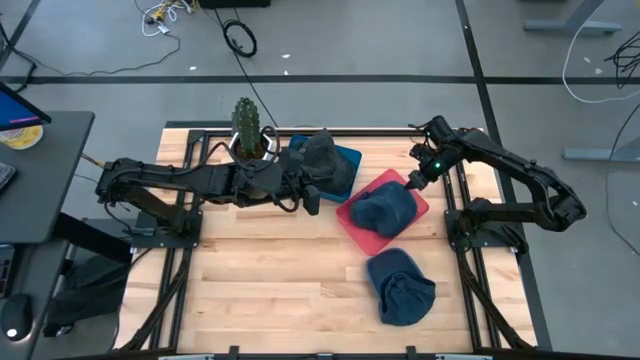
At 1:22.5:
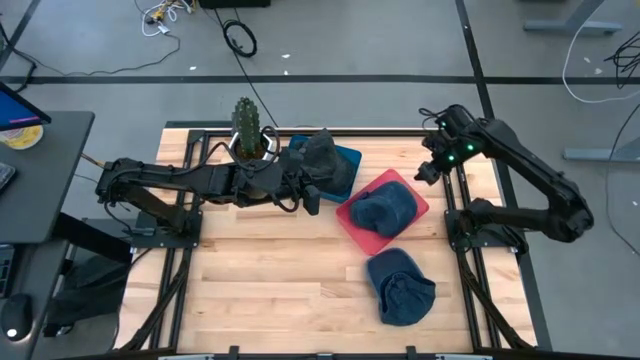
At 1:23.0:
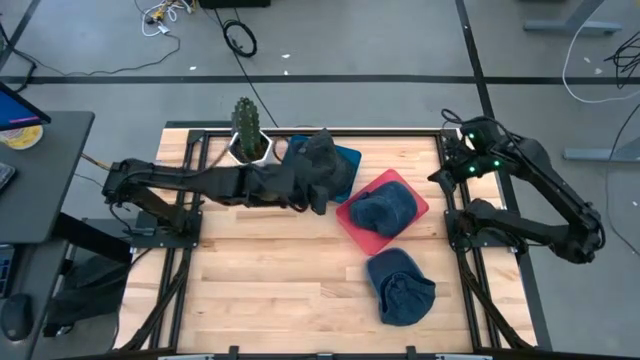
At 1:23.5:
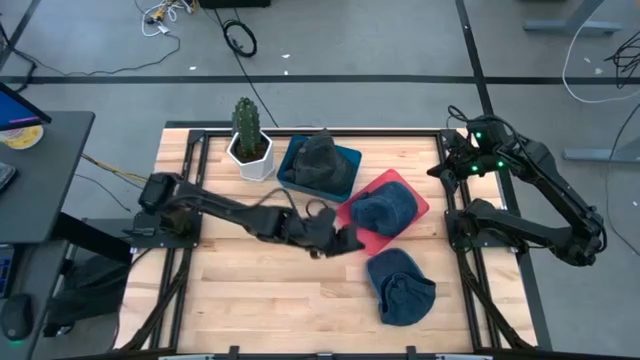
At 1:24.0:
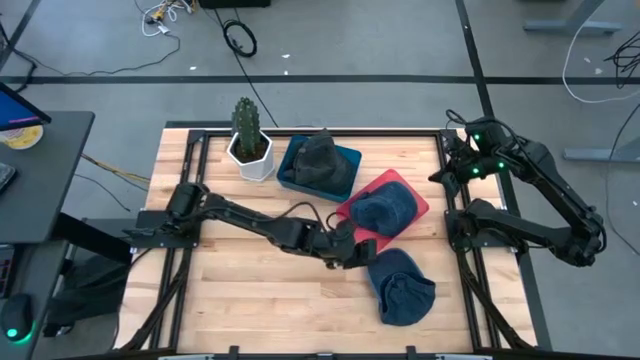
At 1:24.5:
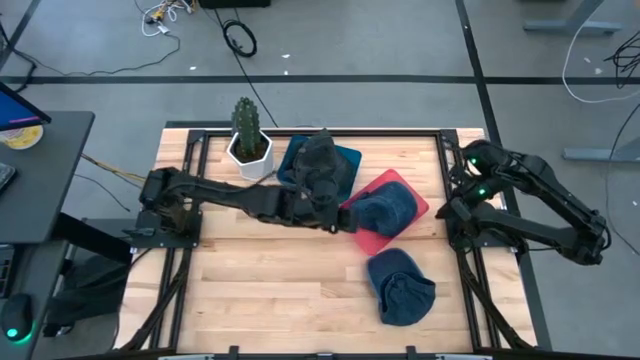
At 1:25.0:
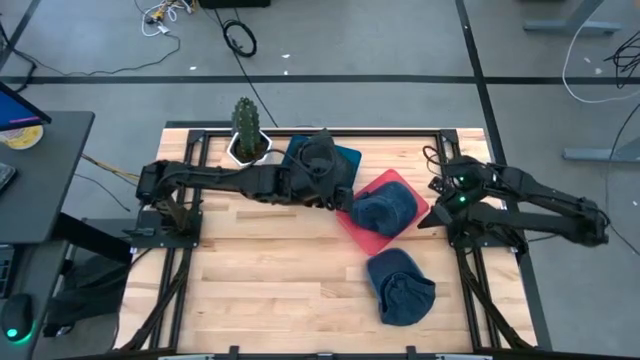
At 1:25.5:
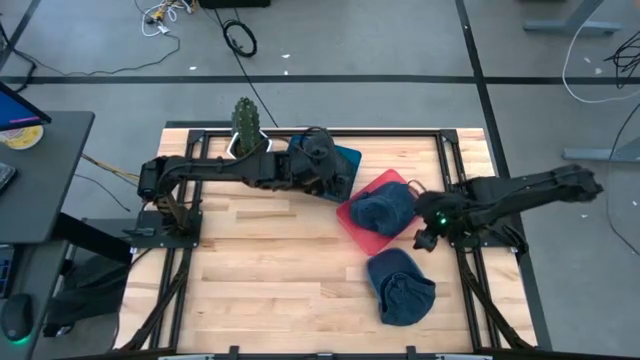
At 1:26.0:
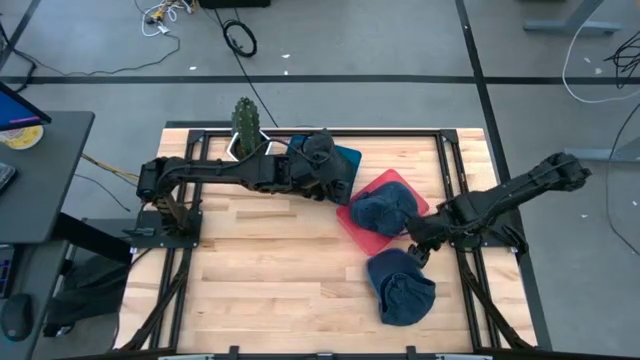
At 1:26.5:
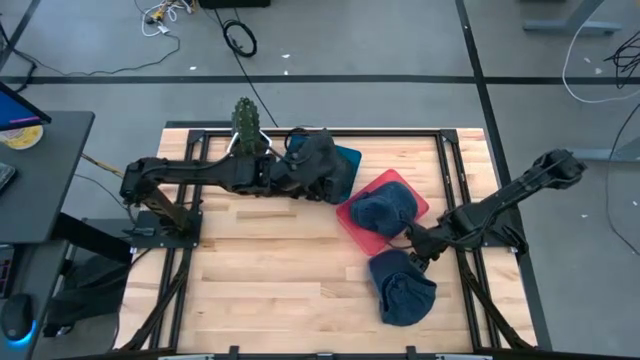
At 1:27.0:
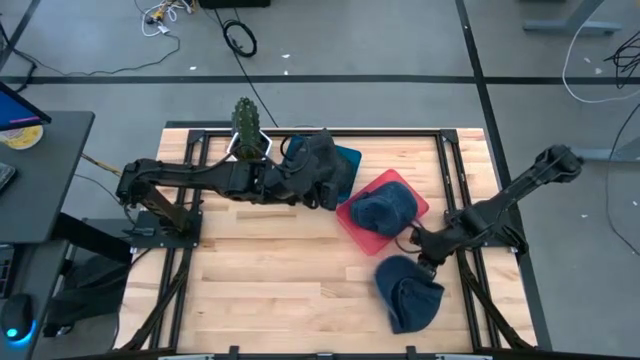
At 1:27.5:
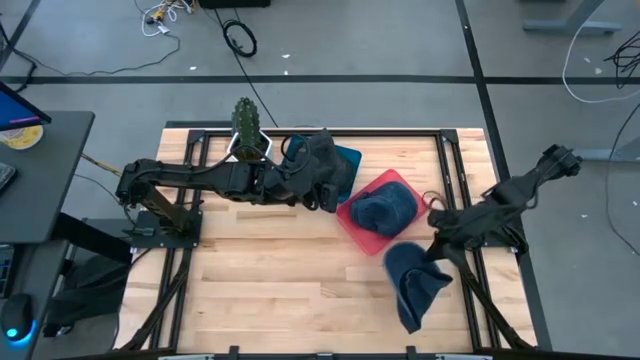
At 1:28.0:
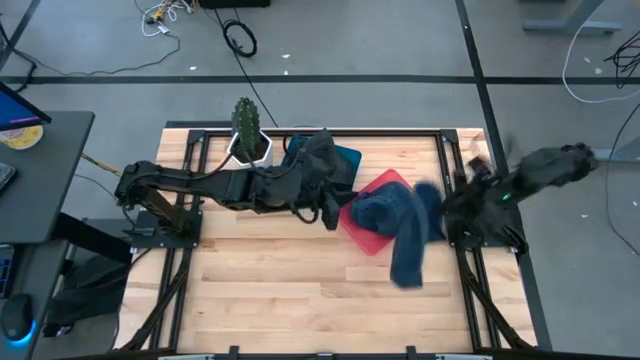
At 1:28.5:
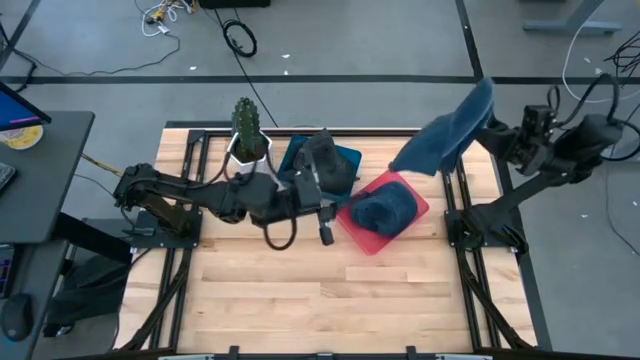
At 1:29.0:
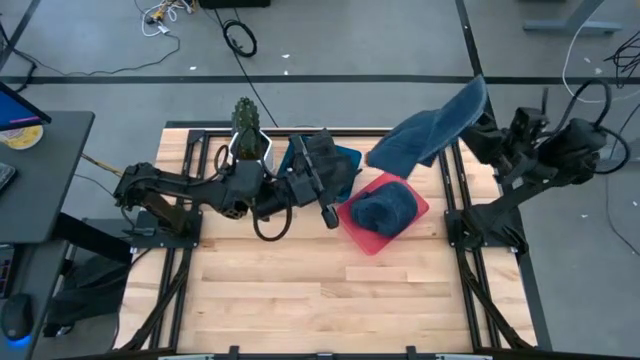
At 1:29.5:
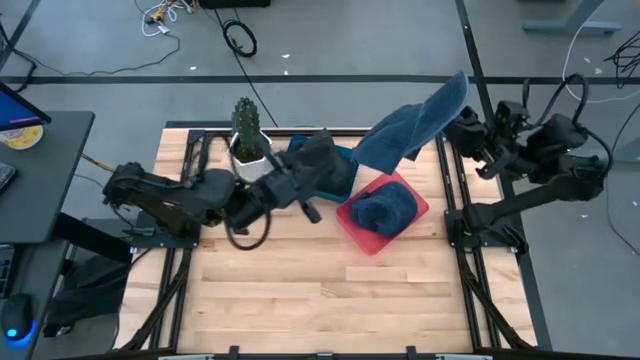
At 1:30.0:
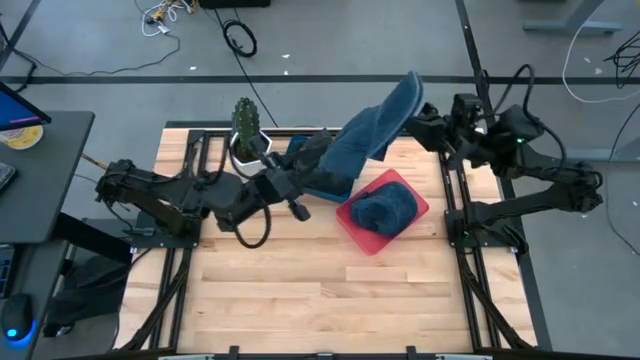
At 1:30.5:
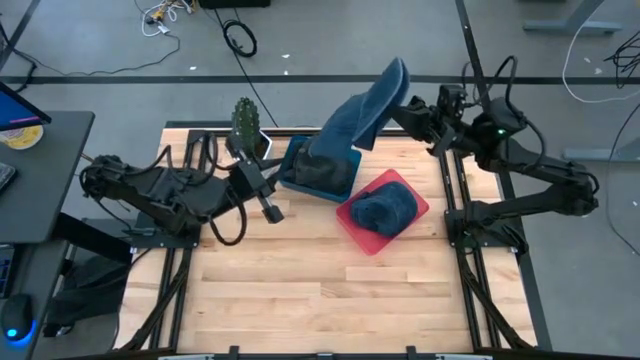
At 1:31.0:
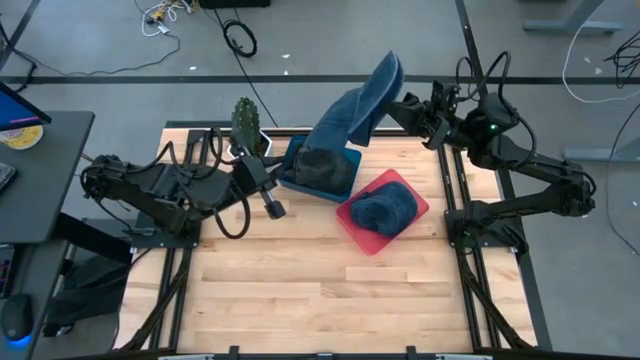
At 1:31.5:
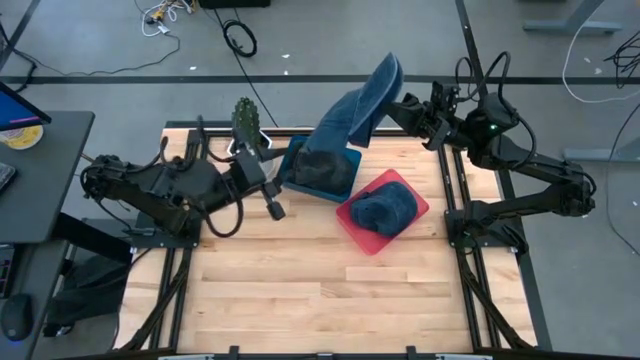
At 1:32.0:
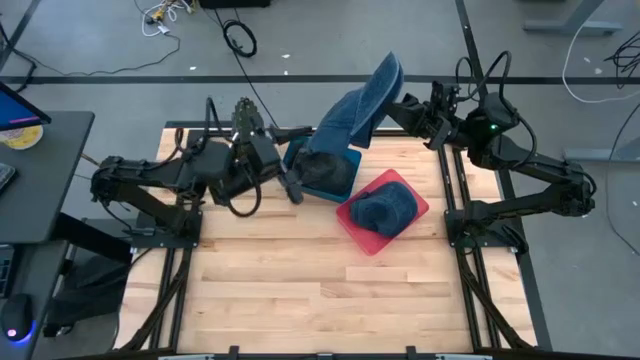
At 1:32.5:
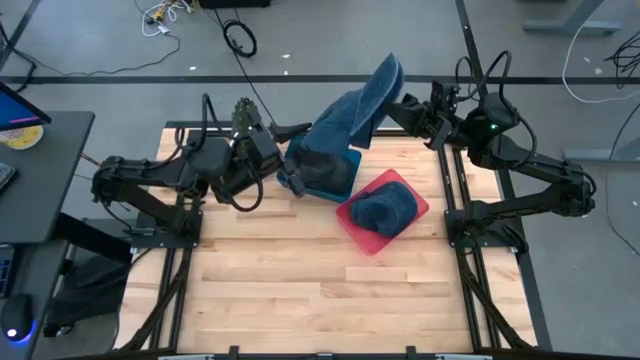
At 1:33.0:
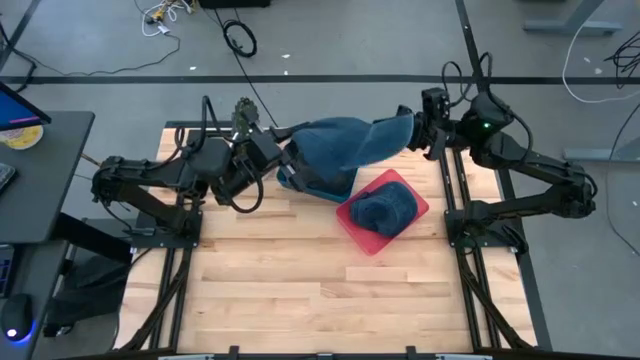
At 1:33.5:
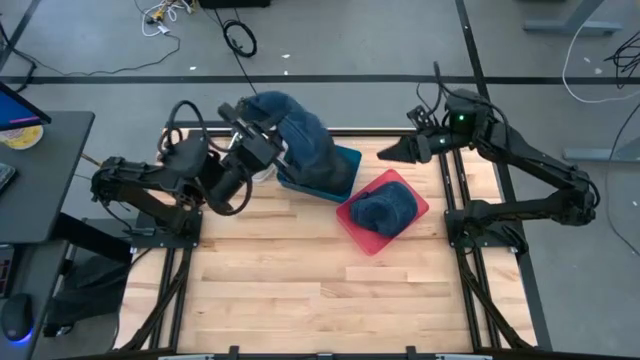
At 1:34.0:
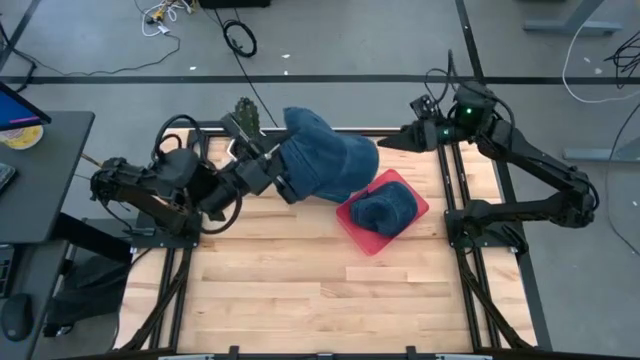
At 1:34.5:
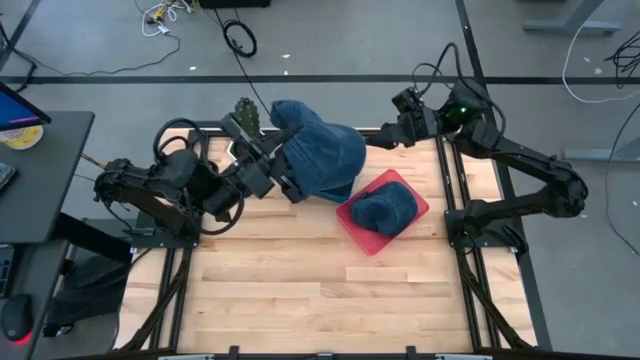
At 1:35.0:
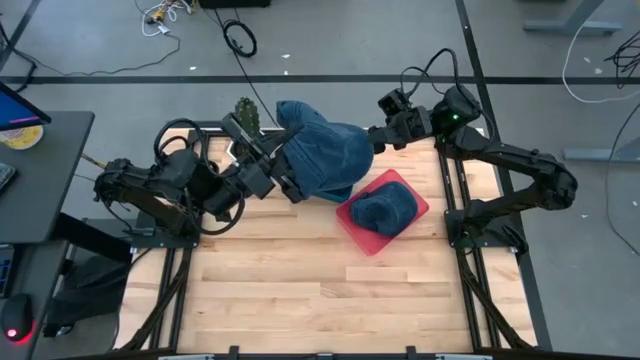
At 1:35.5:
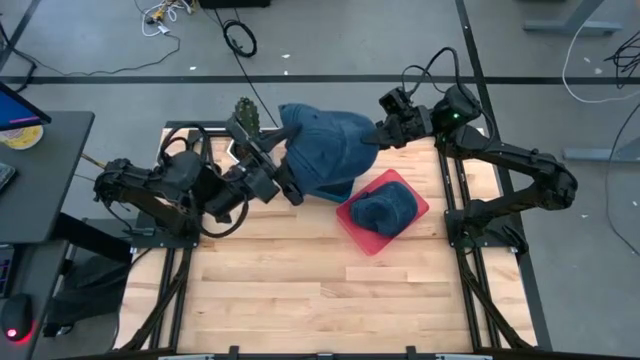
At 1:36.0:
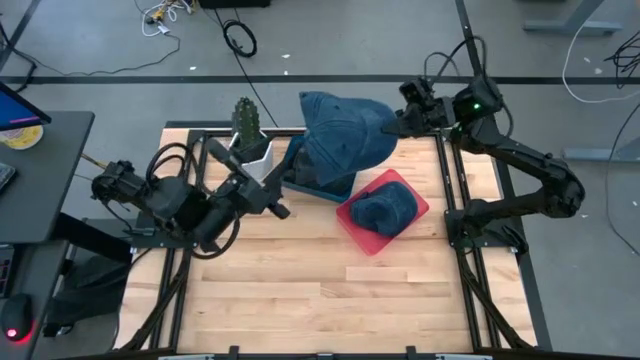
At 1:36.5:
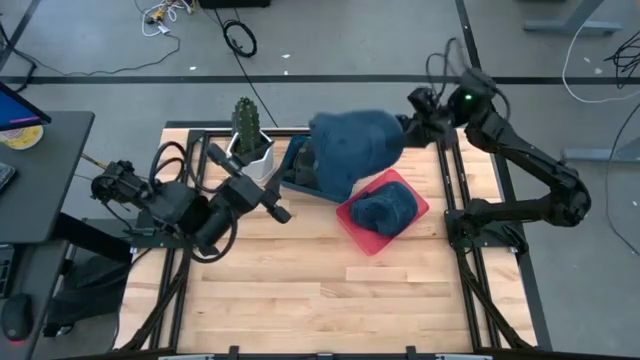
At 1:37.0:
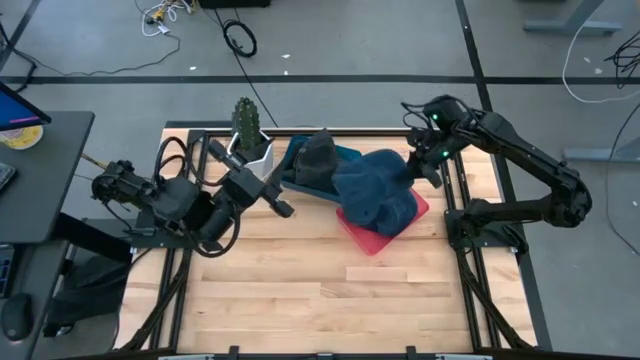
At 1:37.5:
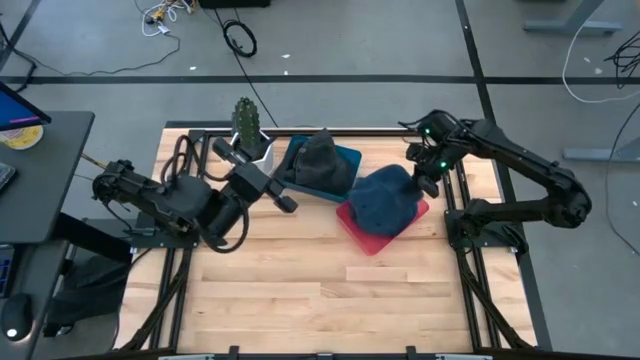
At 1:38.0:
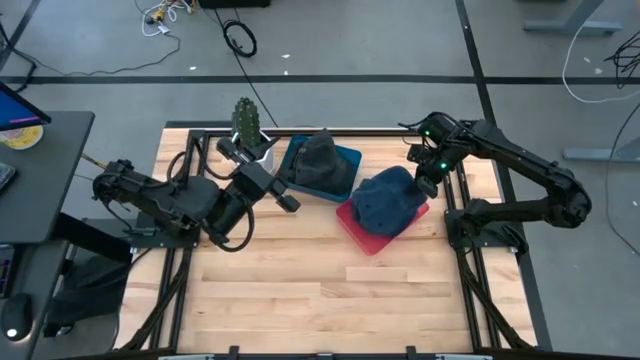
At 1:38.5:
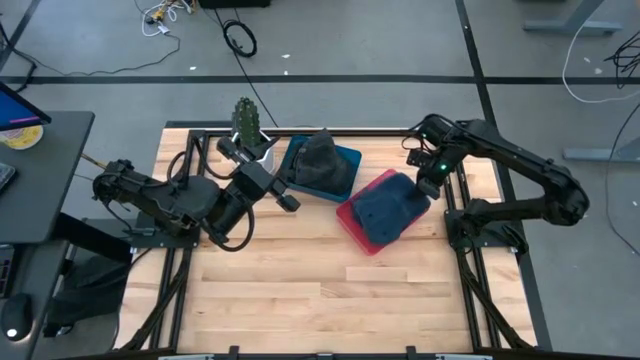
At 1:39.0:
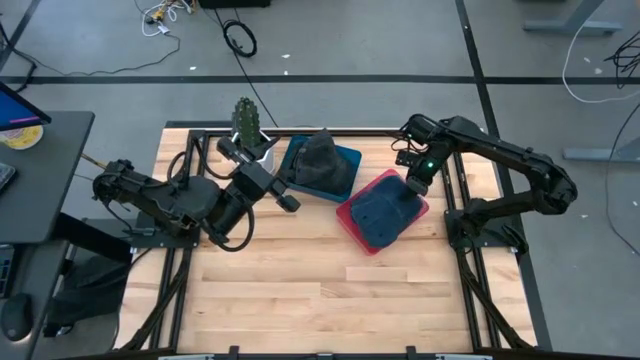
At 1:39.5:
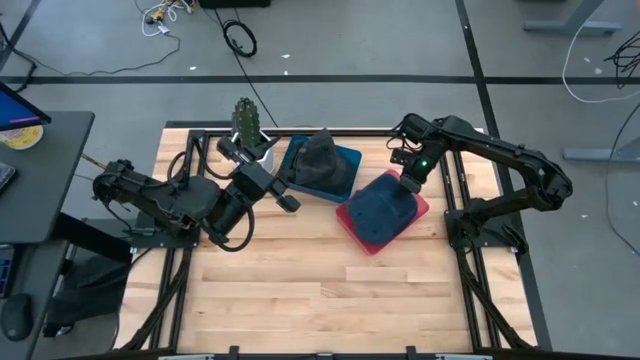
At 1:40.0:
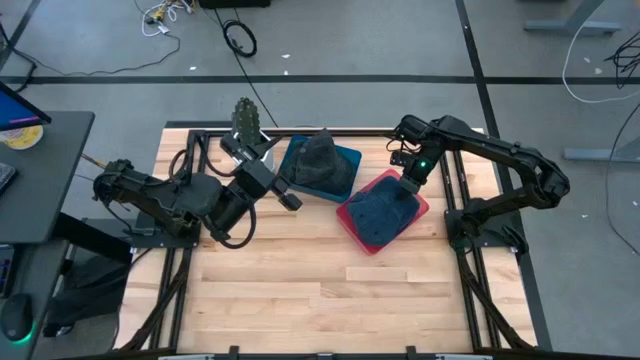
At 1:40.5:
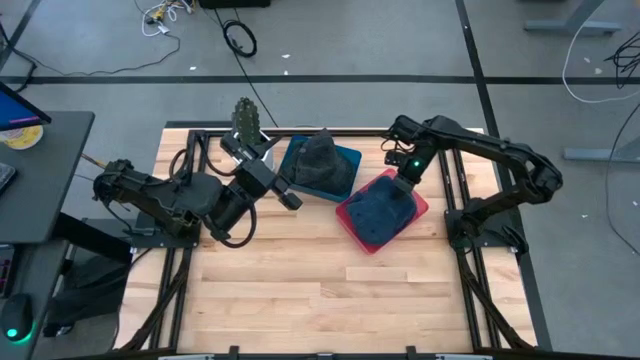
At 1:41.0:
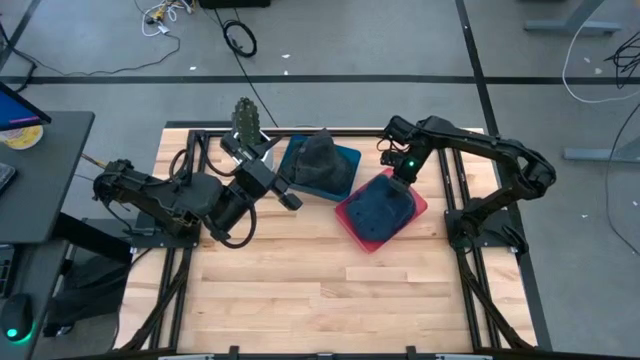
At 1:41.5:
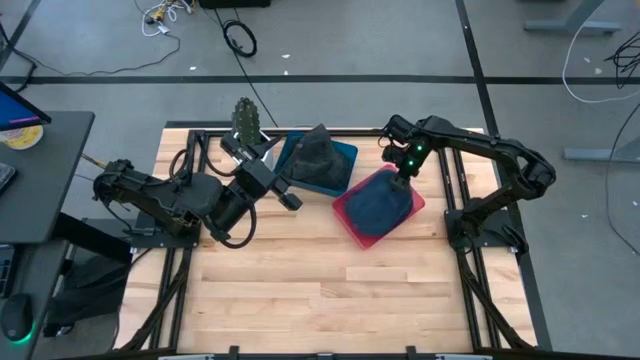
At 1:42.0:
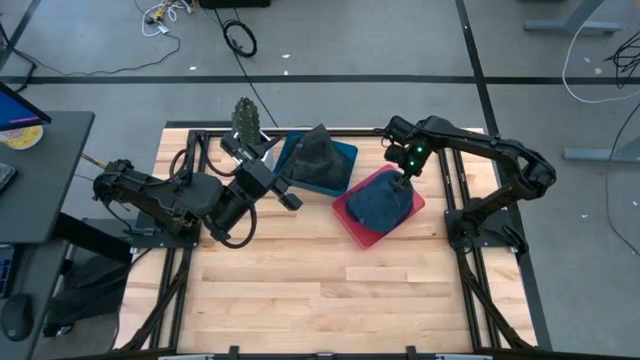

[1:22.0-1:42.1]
Task: Pick & Place hat
Put the blue cap into the pink bin
